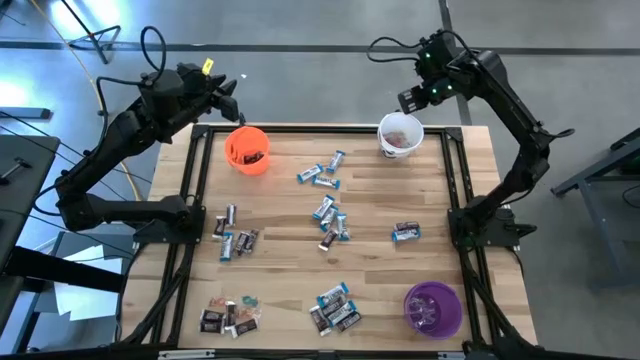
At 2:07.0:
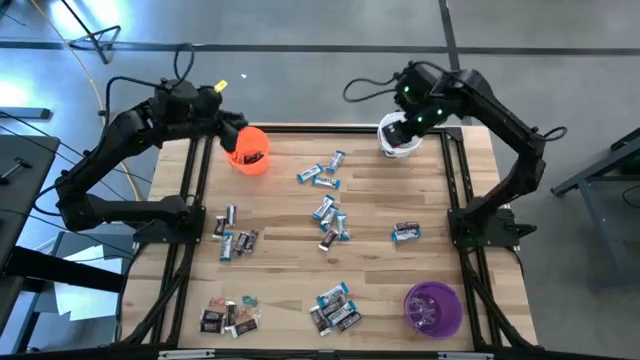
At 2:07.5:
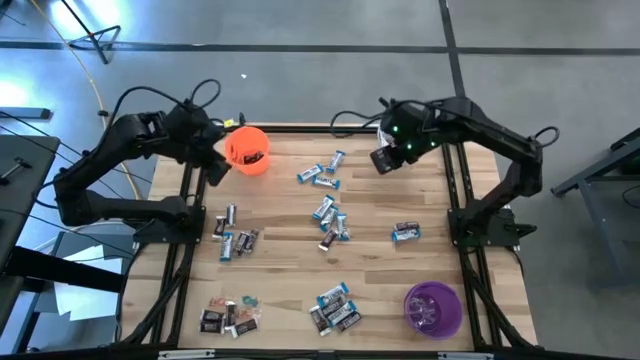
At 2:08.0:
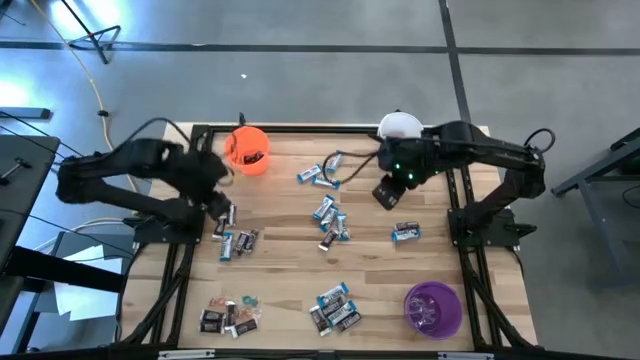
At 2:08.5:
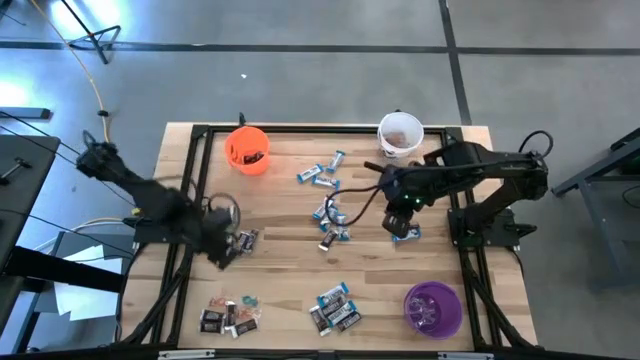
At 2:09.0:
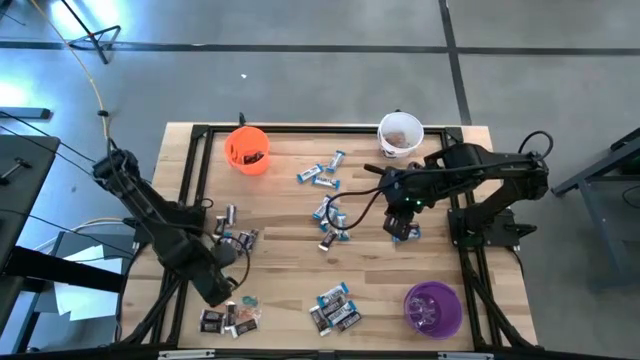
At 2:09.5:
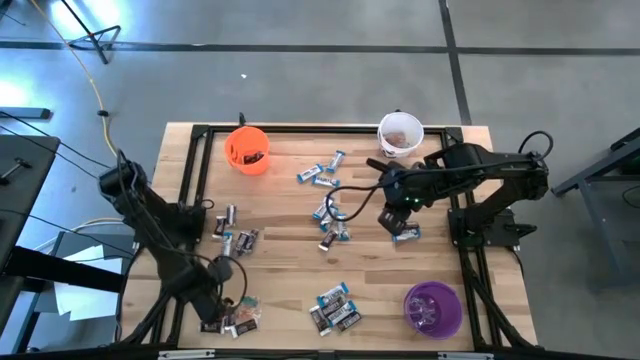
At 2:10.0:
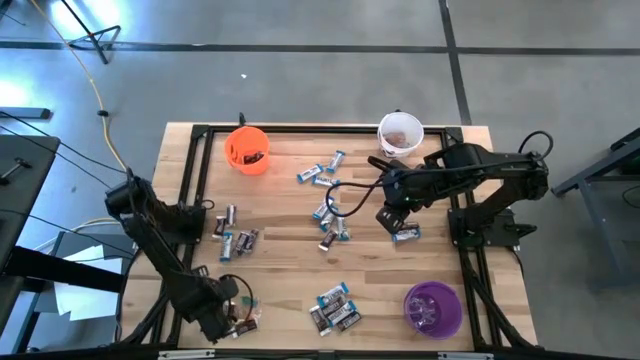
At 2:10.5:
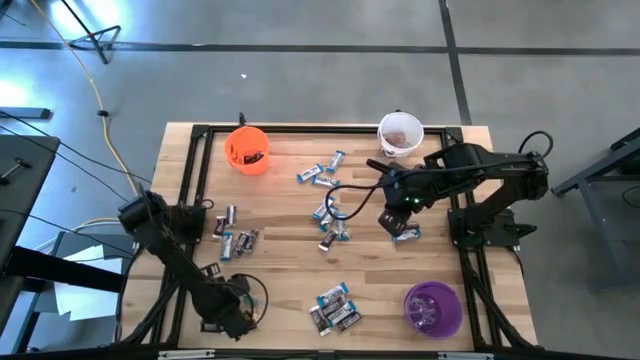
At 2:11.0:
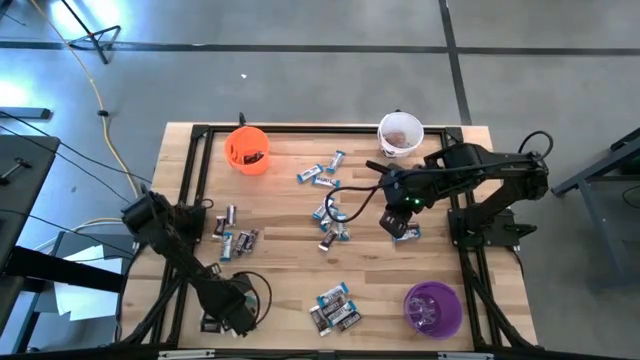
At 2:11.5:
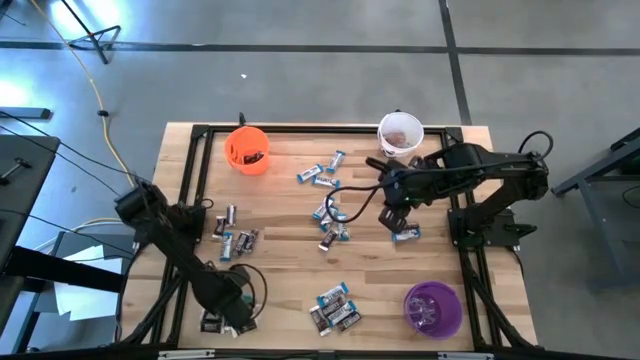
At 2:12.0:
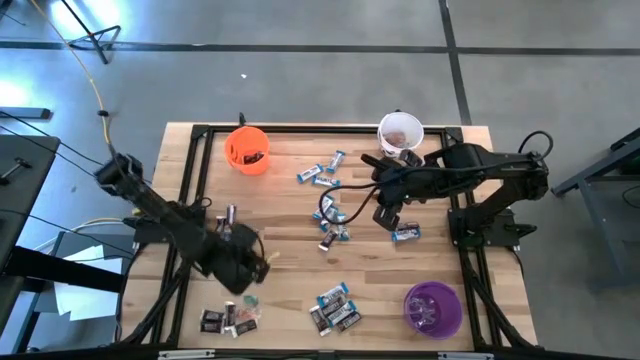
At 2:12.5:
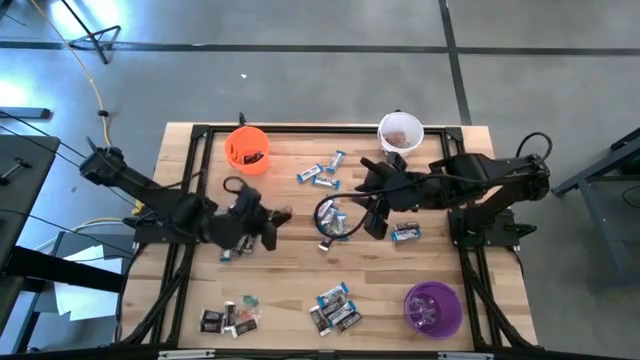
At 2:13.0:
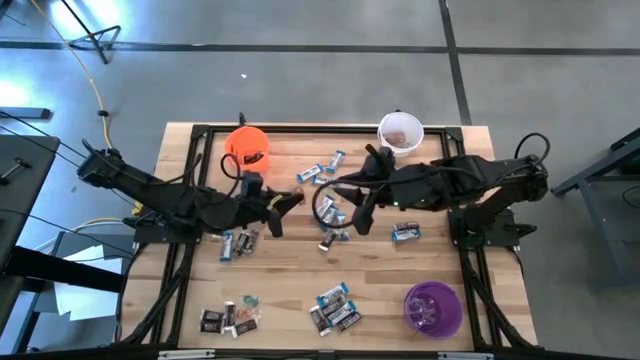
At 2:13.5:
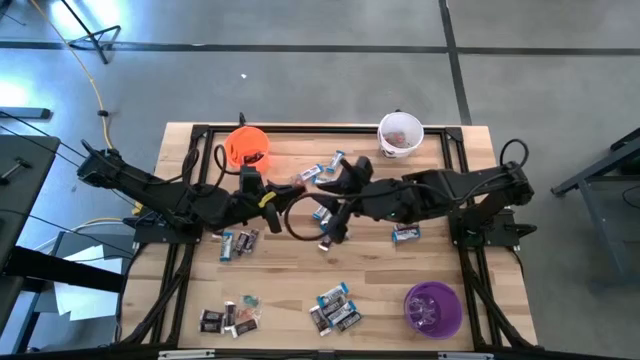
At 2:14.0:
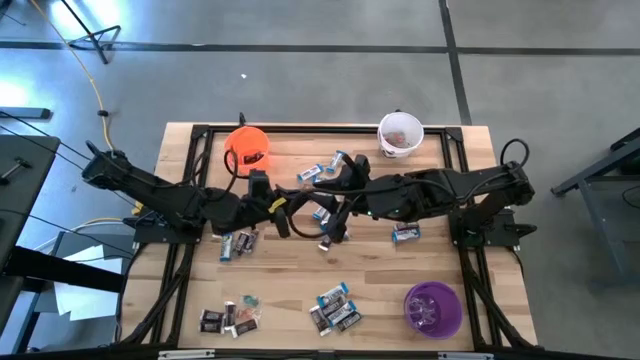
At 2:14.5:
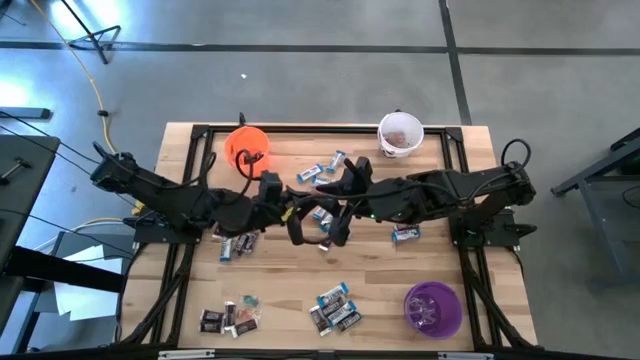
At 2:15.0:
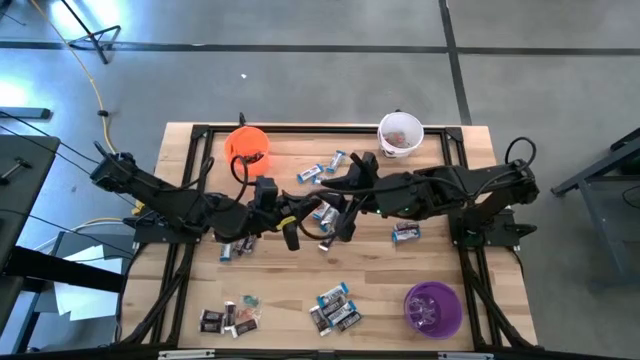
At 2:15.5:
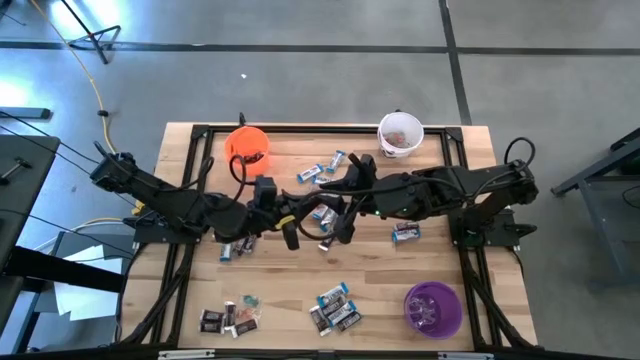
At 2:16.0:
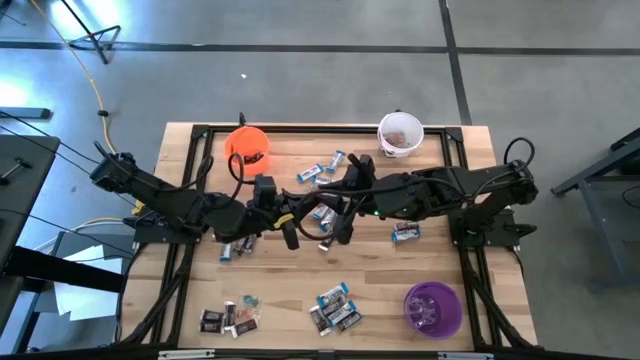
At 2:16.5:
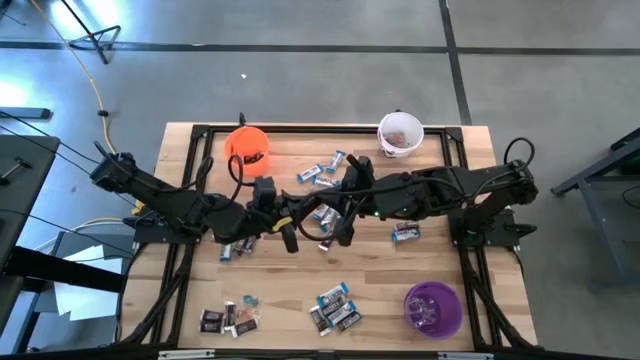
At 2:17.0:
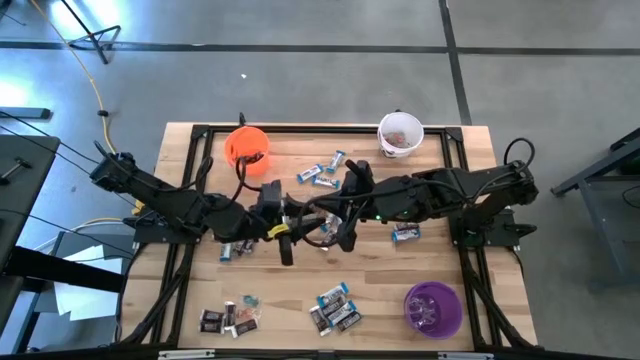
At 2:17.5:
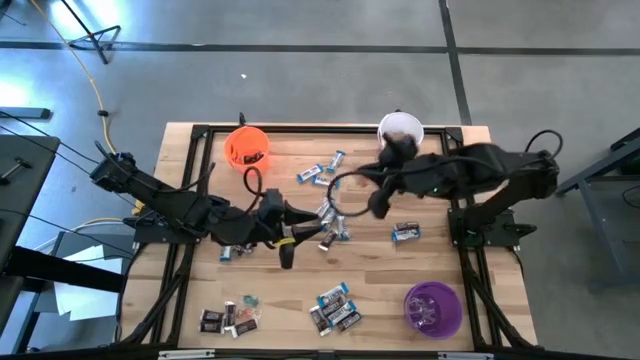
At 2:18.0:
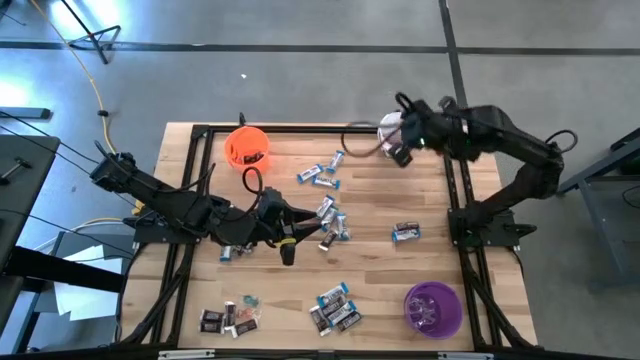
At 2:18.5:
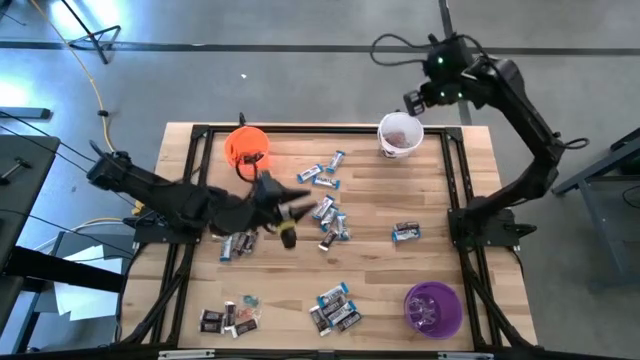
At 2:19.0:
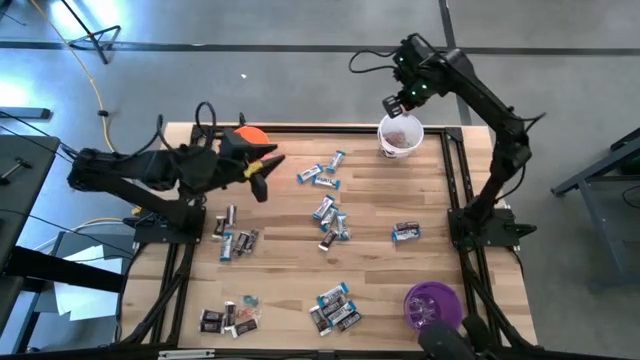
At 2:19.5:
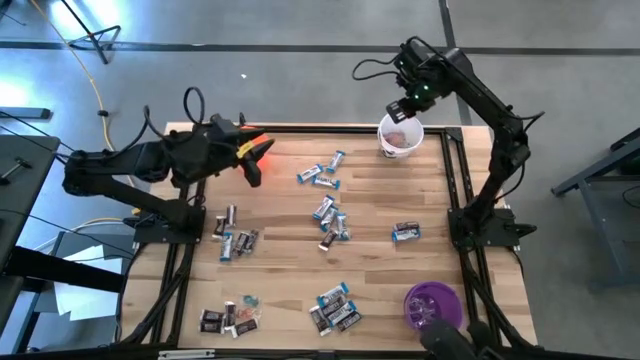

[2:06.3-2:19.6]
Task: Sort candy
Put the orange gummy into the white bucket

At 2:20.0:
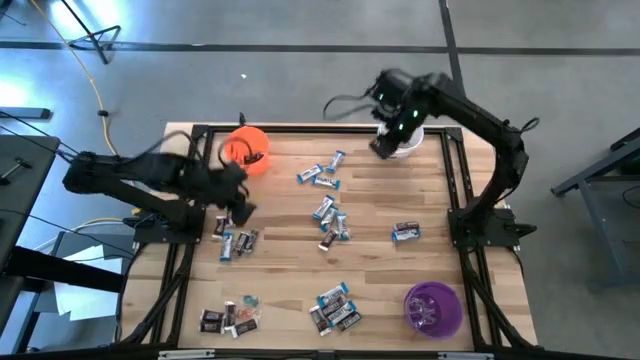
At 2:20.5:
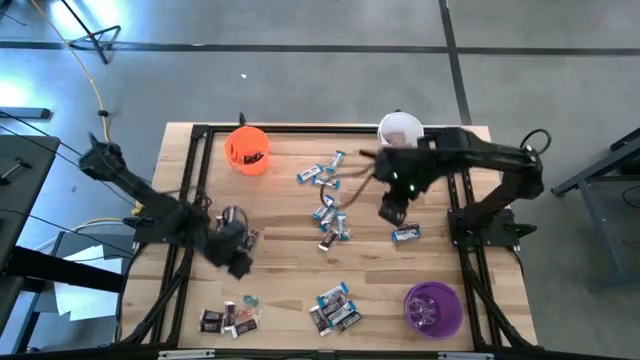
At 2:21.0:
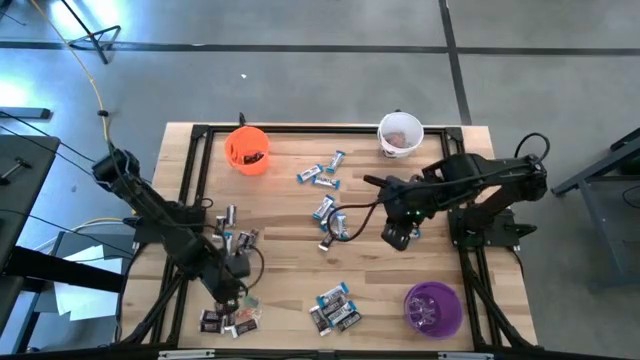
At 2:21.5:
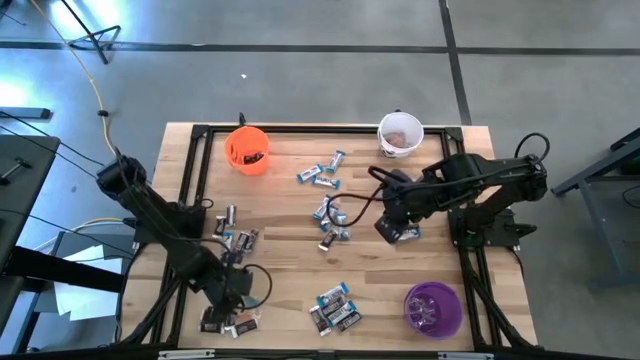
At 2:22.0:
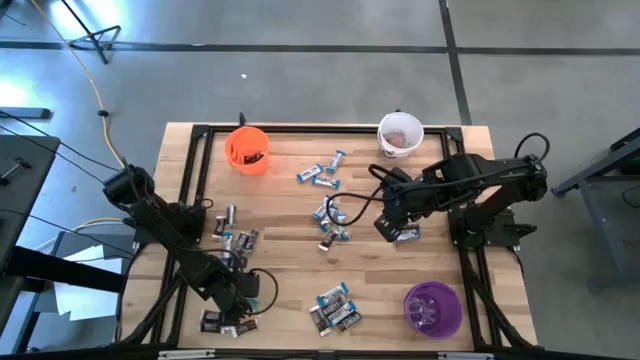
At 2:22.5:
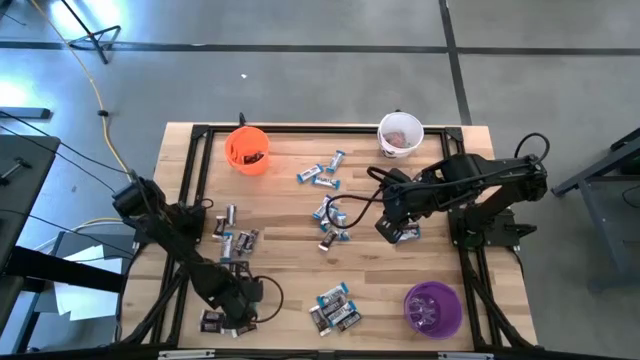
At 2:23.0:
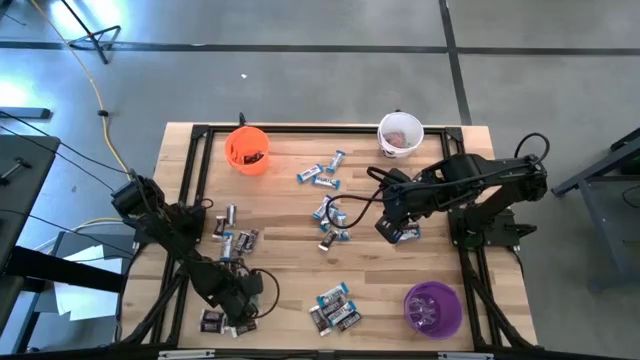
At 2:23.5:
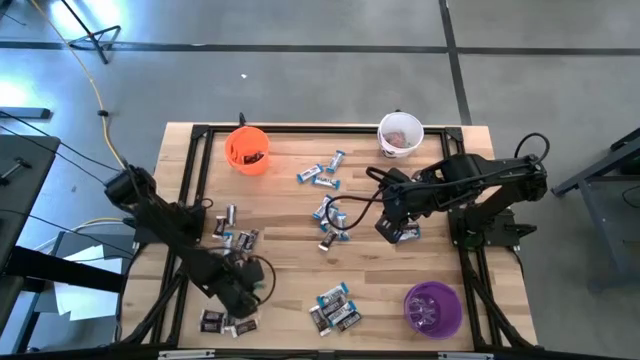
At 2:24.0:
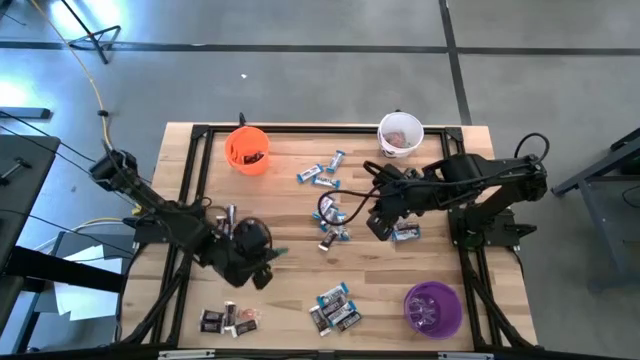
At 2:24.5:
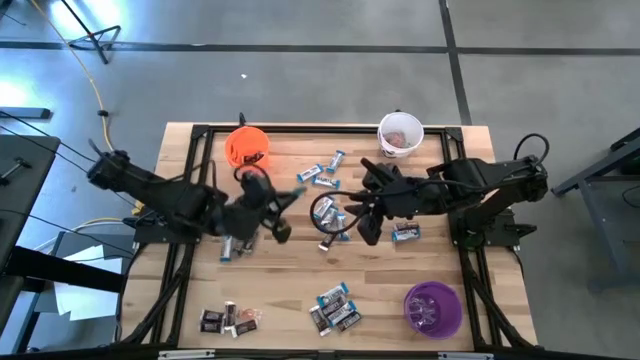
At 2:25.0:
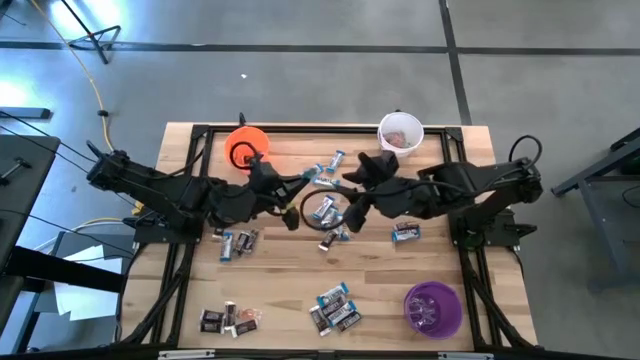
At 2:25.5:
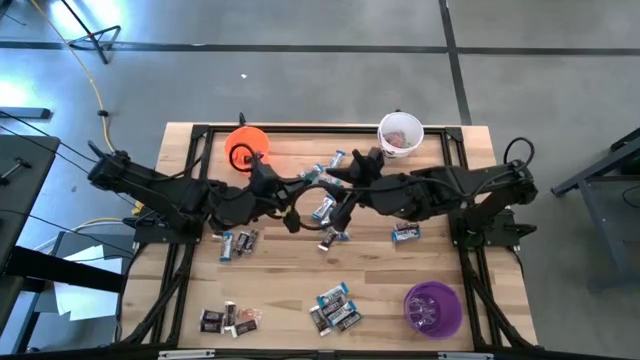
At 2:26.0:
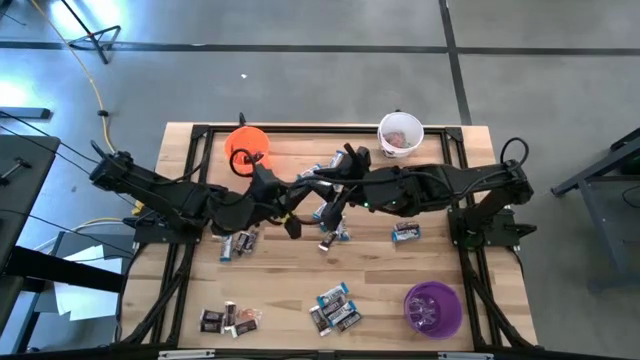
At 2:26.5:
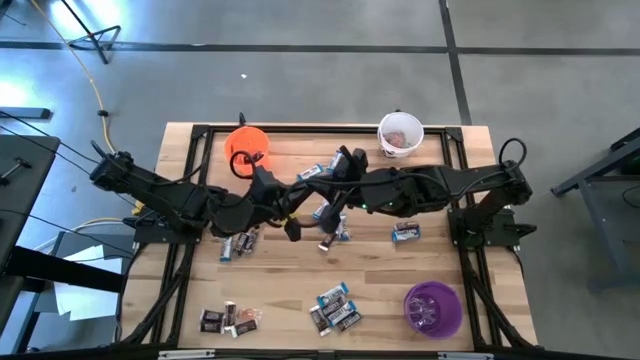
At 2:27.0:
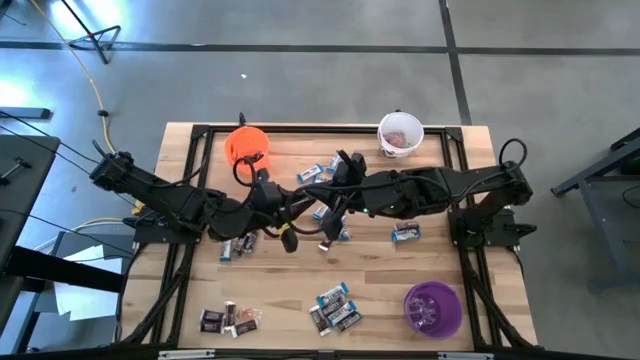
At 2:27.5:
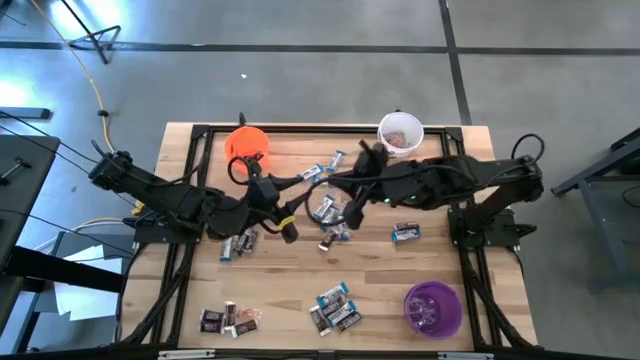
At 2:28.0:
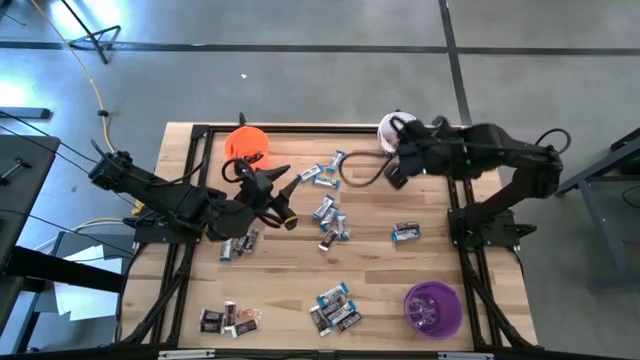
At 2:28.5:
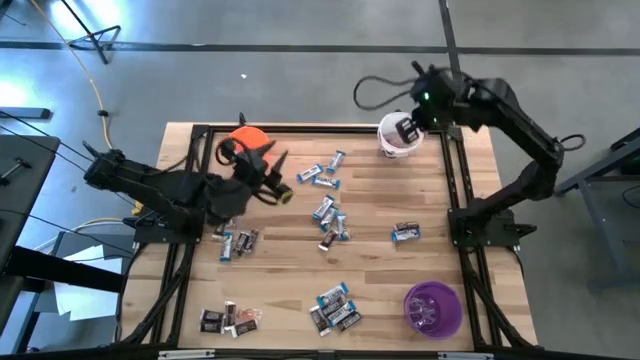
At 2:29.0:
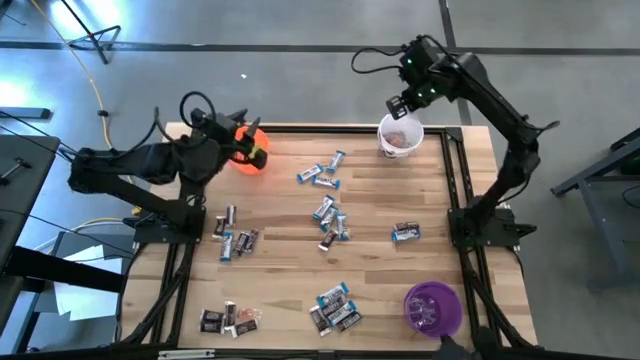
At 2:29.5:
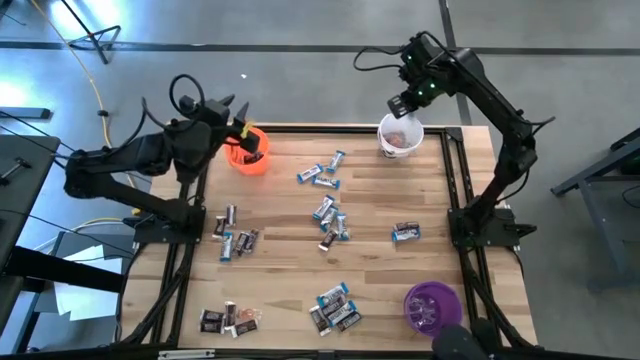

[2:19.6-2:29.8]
Put the blue gummy into the white bucket
